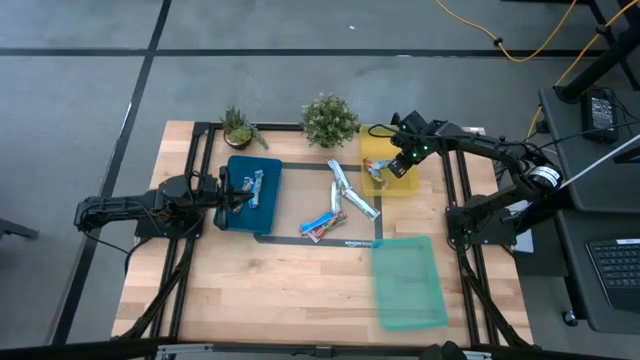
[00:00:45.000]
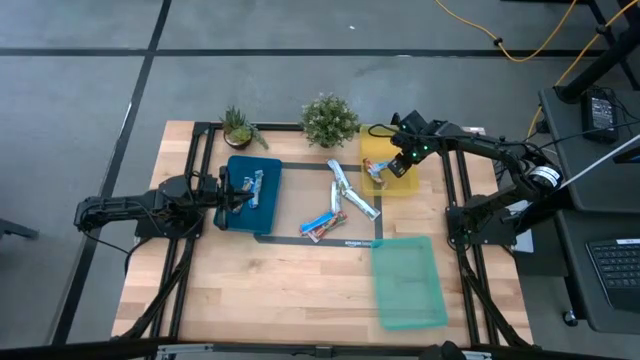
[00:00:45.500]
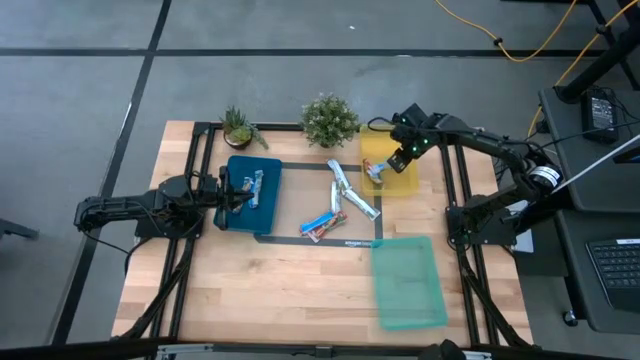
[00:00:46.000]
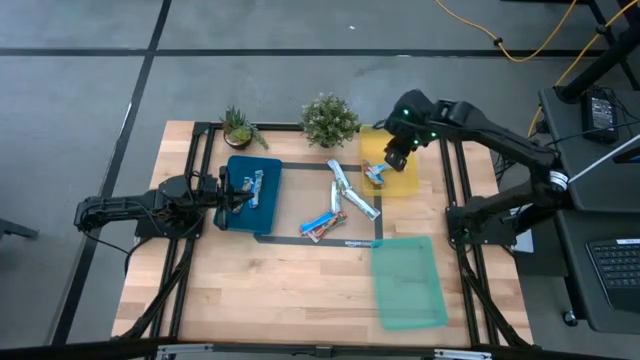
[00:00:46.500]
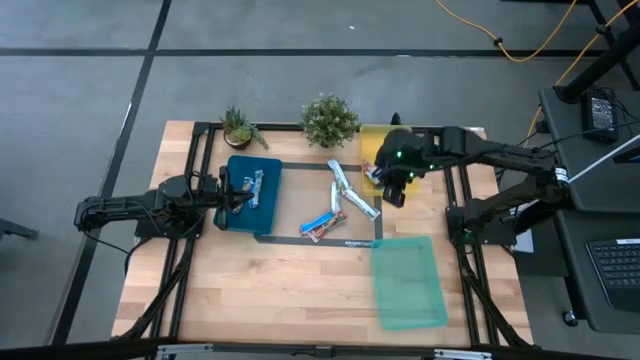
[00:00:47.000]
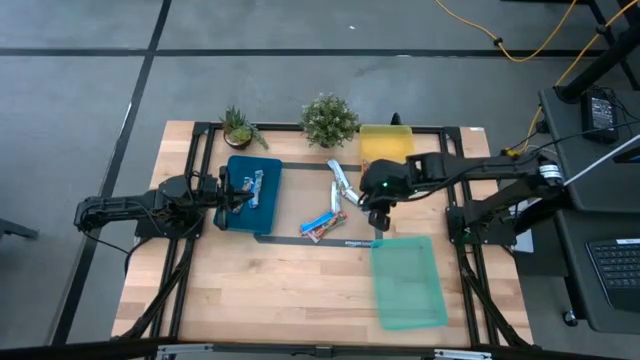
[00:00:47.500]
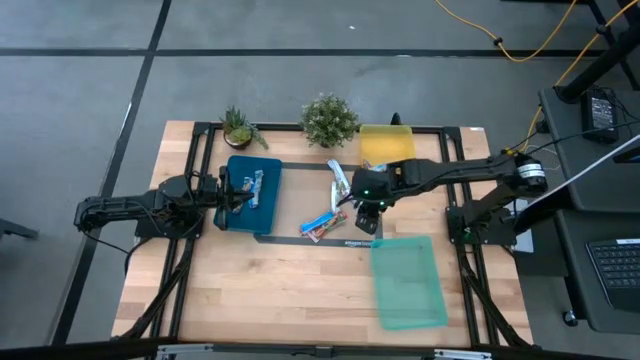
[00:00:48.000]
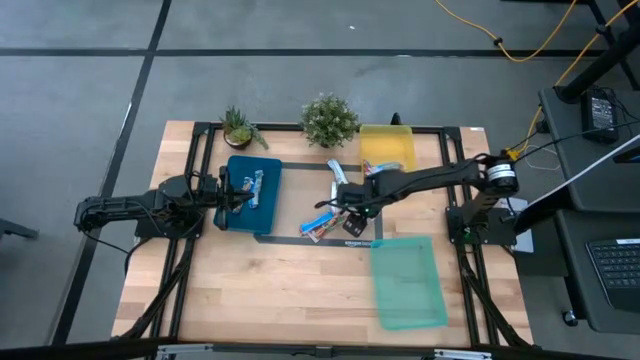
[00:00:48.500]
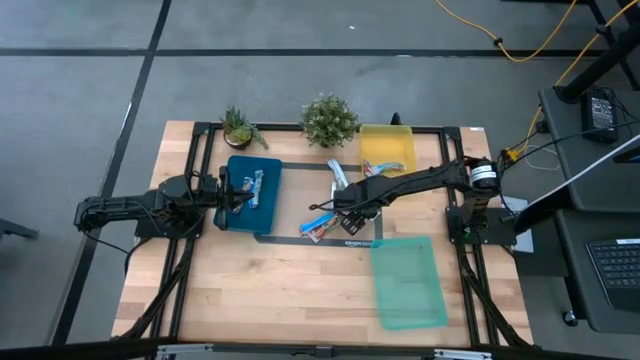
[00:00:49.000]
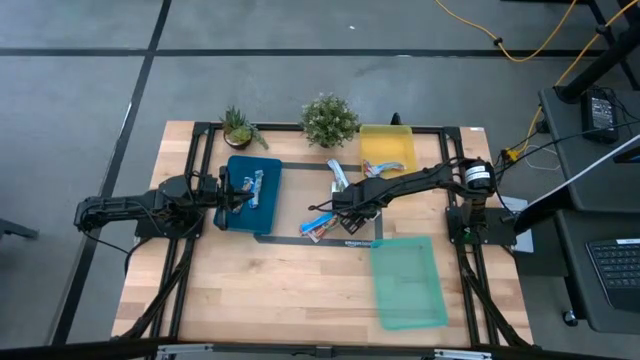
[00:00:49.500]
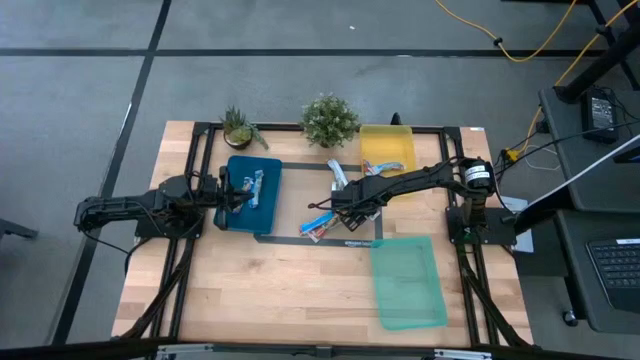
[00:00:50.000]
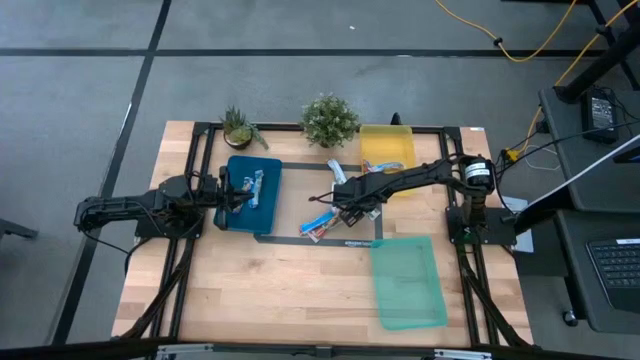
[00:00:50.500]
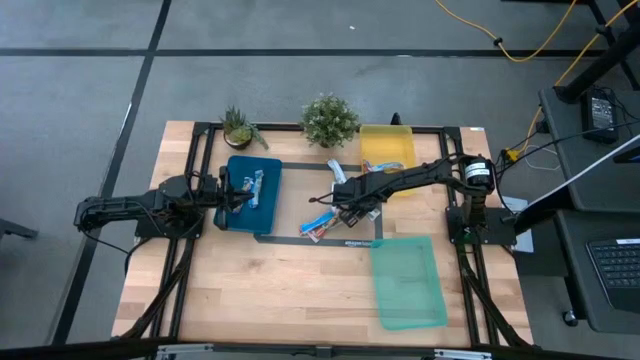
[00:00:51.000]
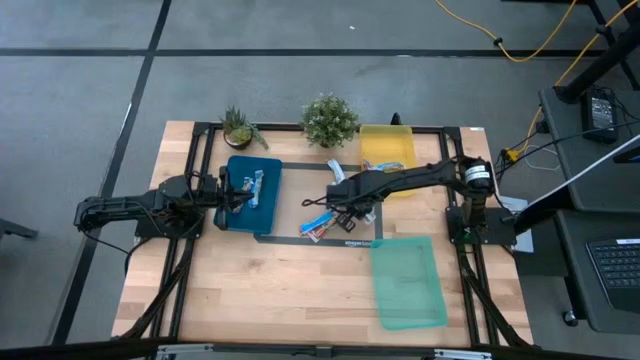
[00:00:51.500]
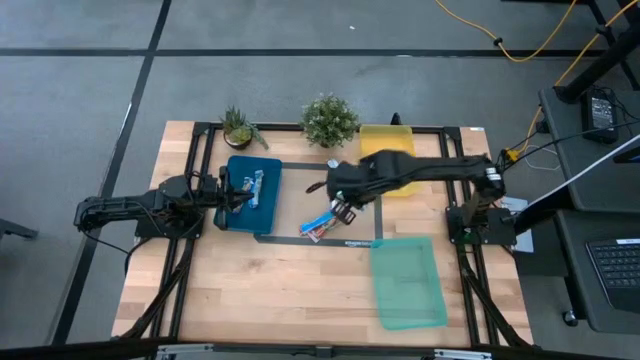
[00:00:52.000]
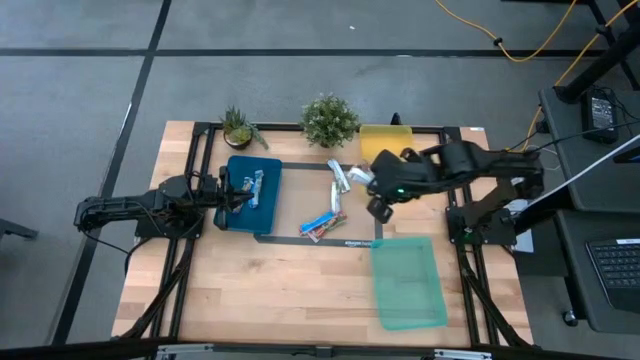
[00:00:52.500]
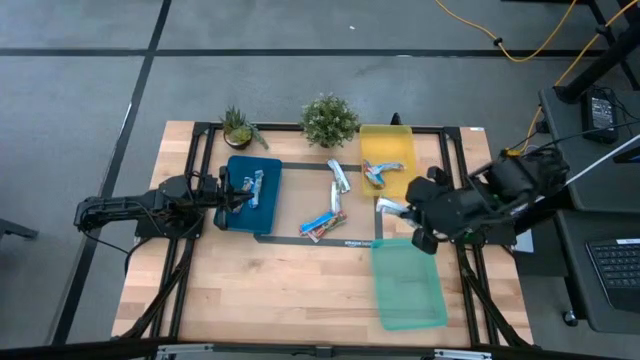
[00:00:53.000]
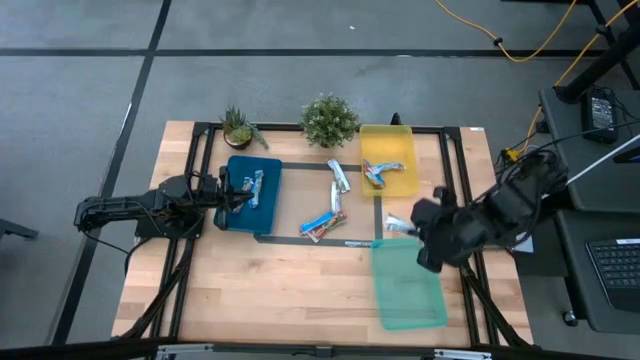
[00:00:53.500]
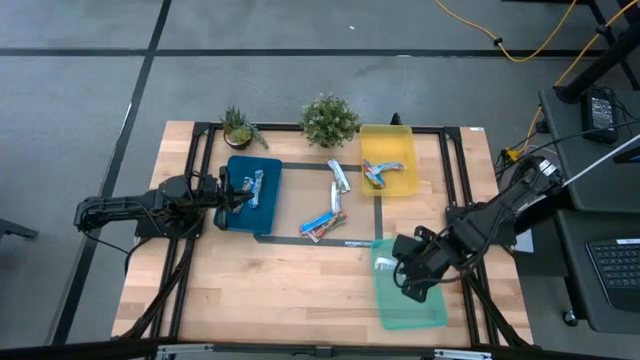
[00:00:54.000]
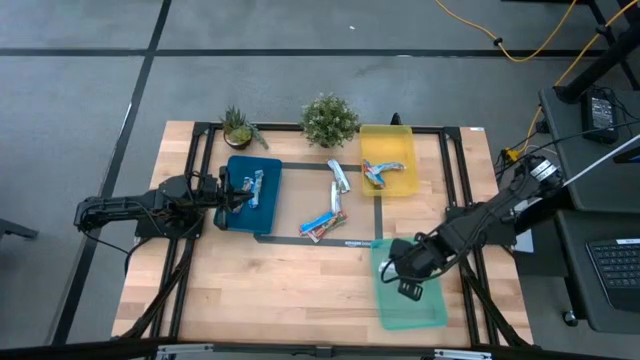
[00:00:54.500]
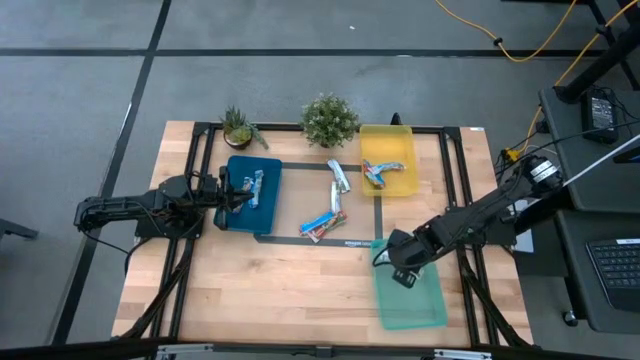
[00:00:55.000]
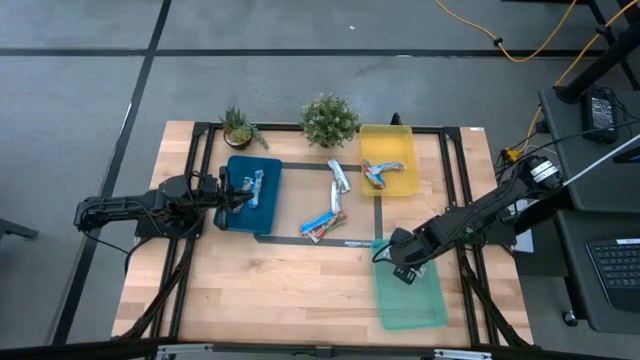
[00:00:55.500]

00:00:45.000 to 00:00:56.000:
Task: Pick and place Granola Bars by type
Put the yellow granola bar into the green bin

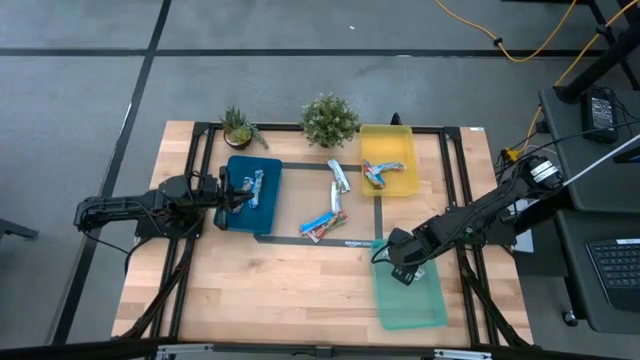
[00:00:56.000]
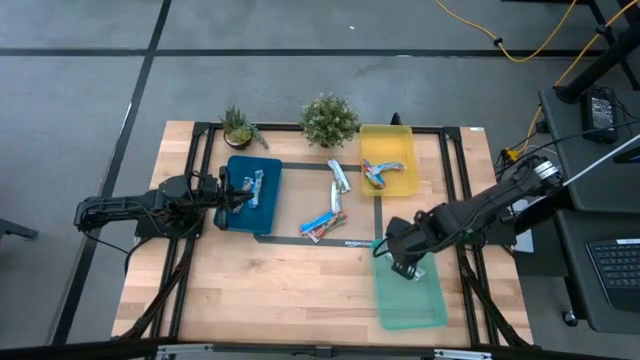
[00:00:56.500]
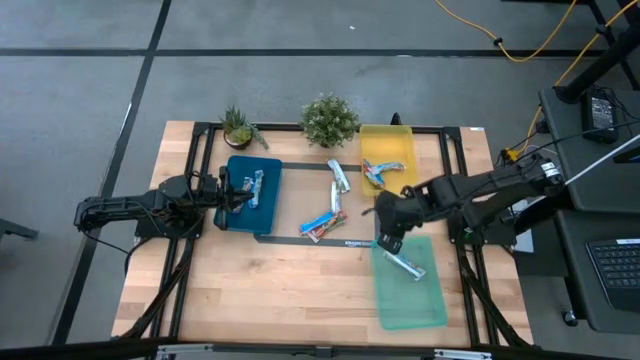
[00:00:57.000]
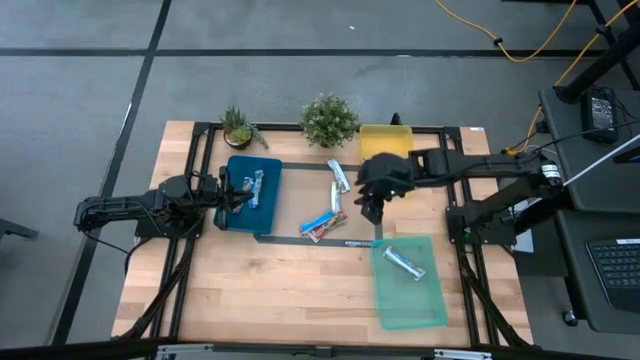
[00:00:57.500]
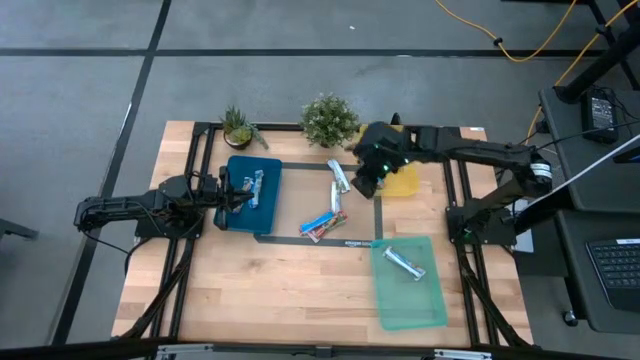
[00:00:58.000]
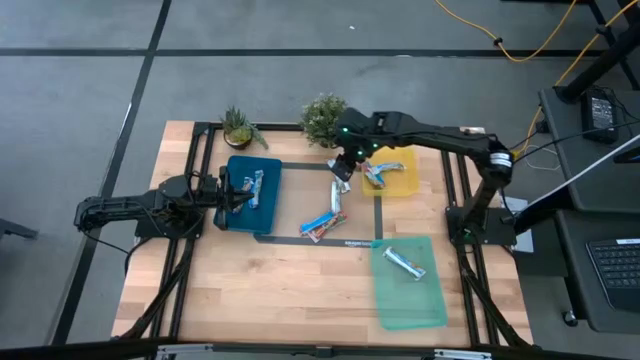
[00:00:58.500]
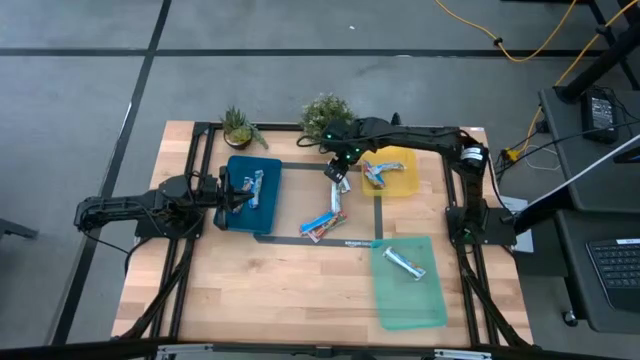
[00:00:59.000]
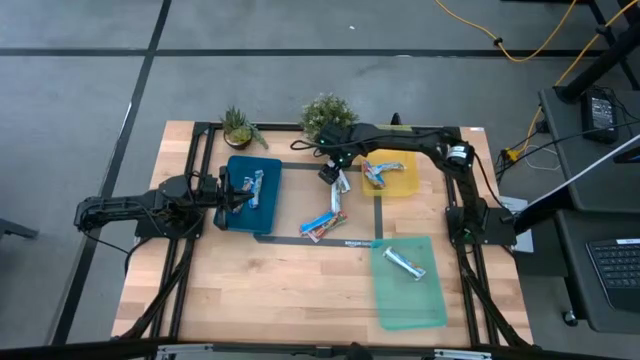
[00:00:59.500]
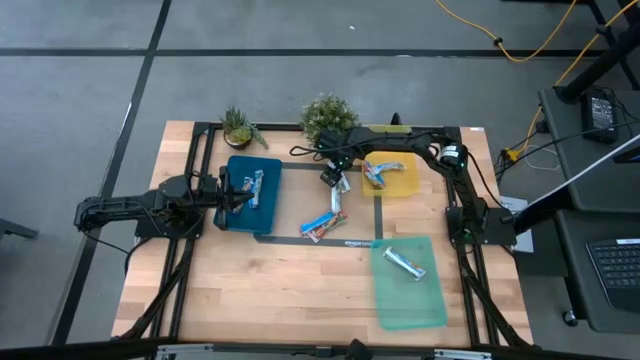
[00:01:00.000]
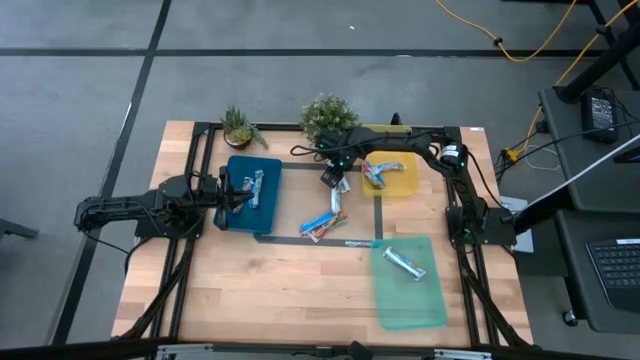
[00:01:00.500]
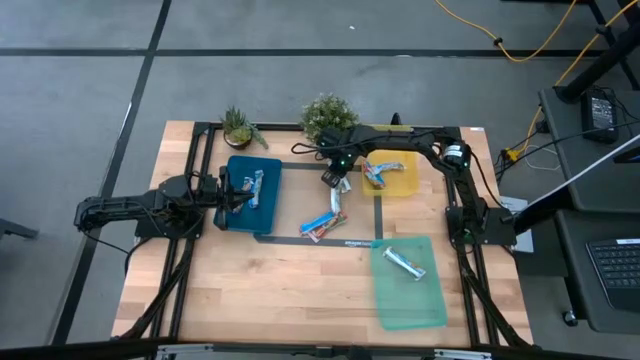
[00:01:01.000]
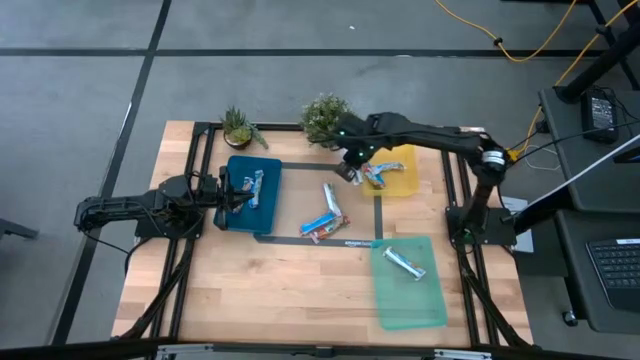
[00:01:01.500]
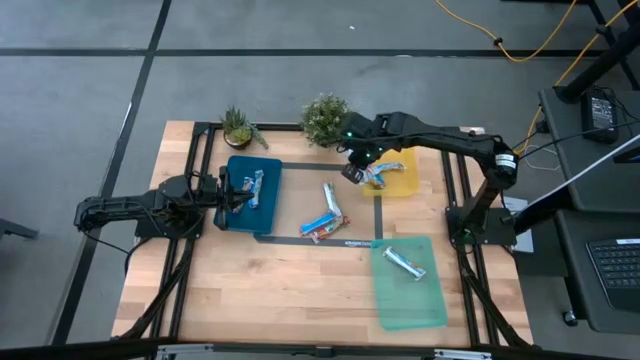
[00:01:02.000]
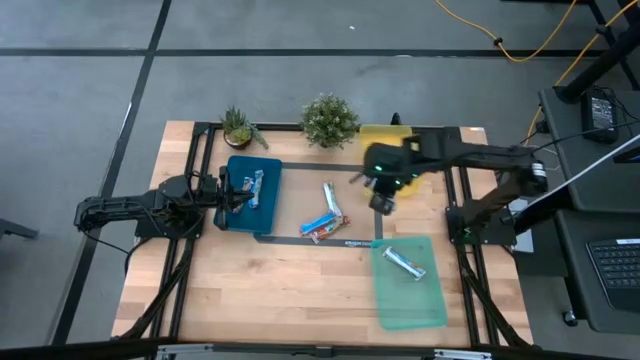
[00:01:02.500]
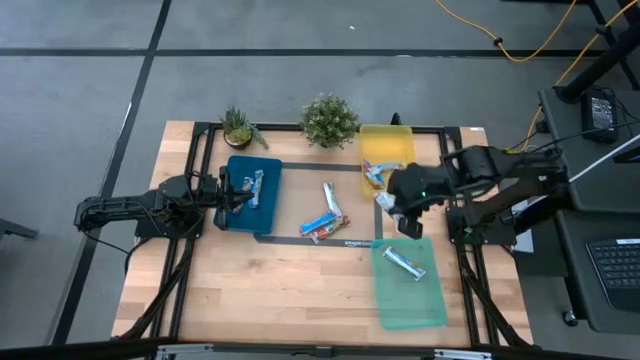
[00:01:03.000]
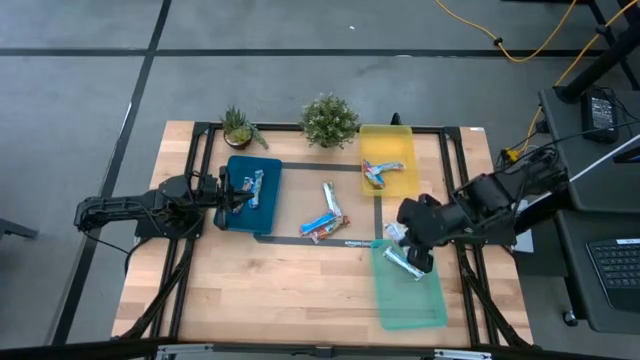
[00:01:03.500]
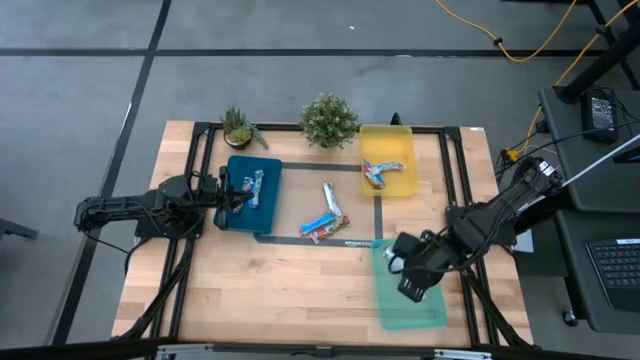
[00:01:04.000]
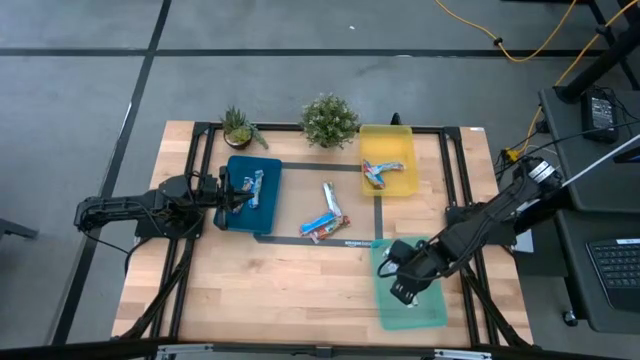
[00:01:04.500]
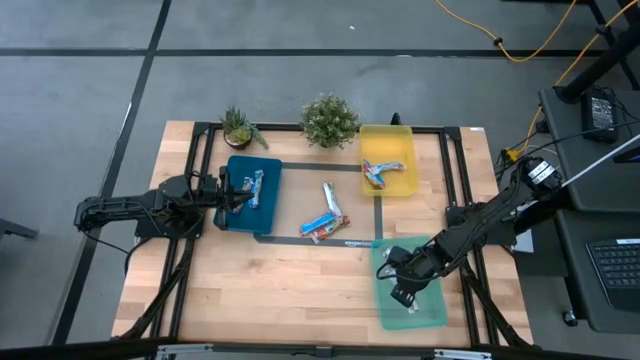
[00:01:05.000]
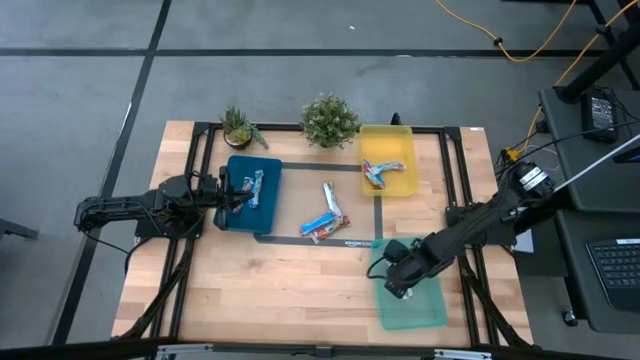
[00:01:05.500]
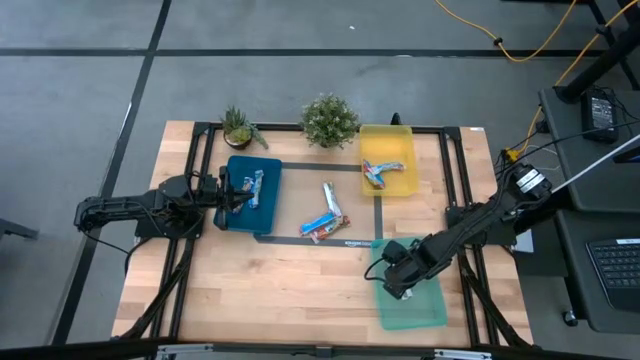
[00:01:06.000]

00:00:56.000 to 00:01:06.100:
Put the yellow granola bar into the green bin
